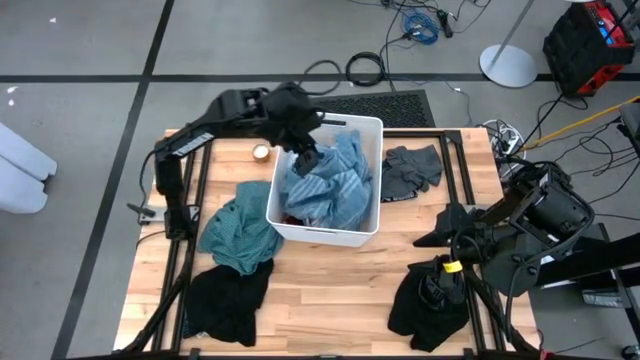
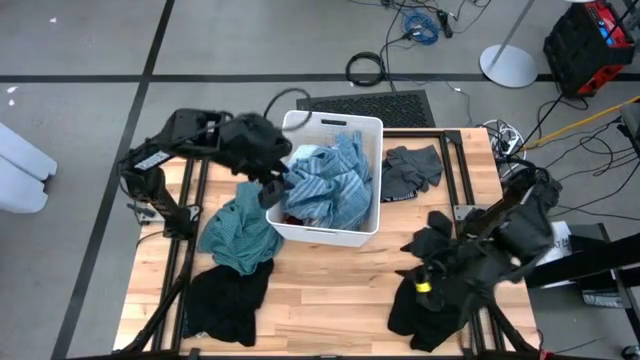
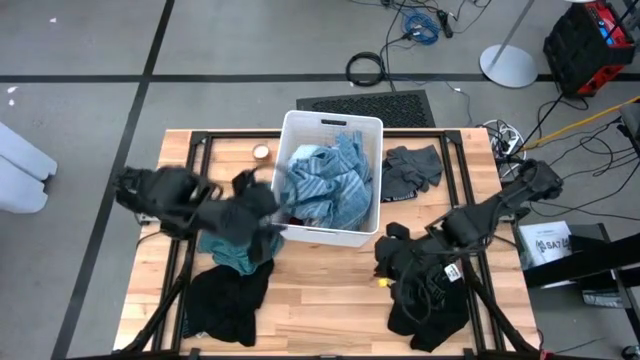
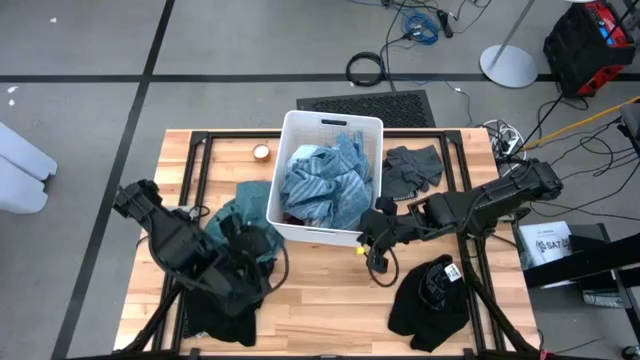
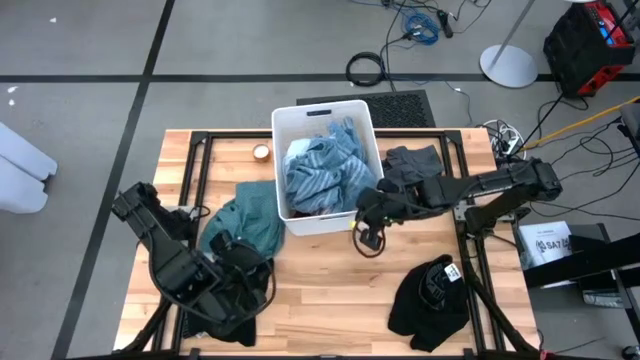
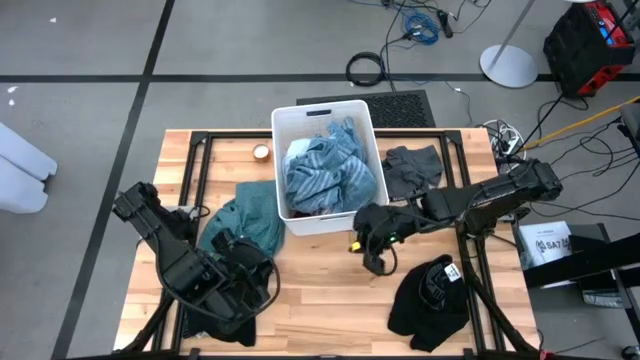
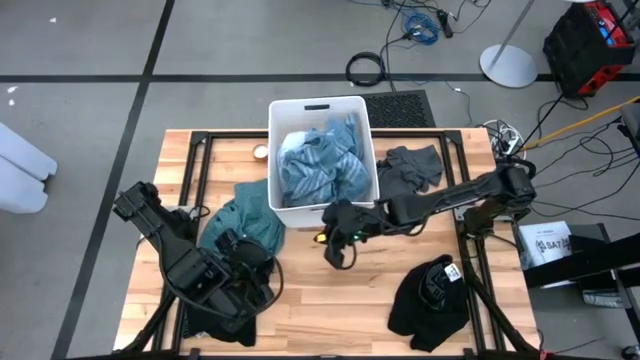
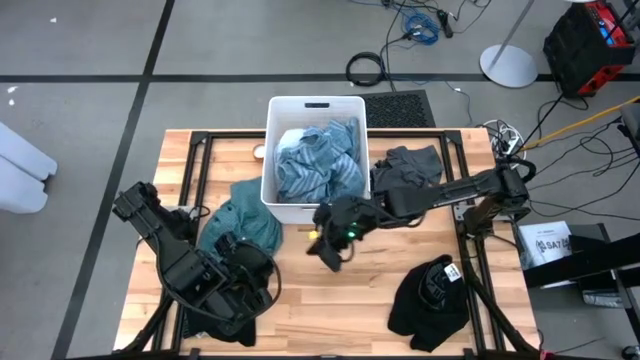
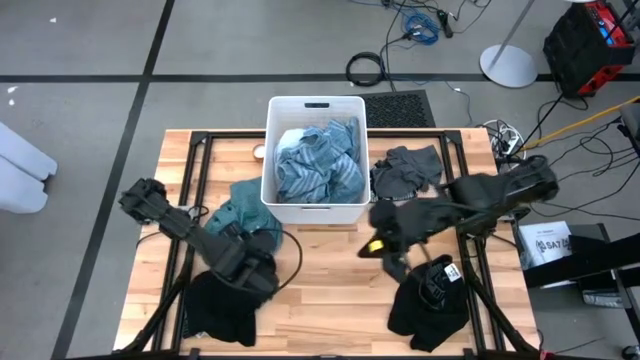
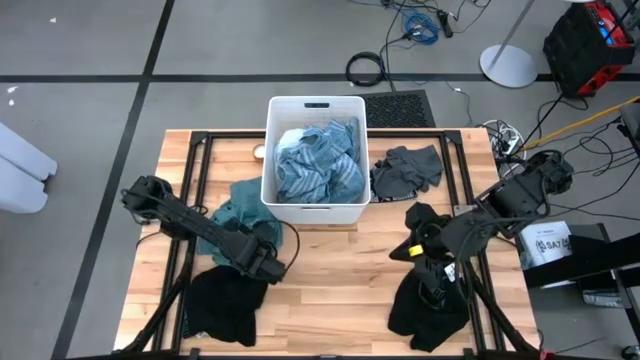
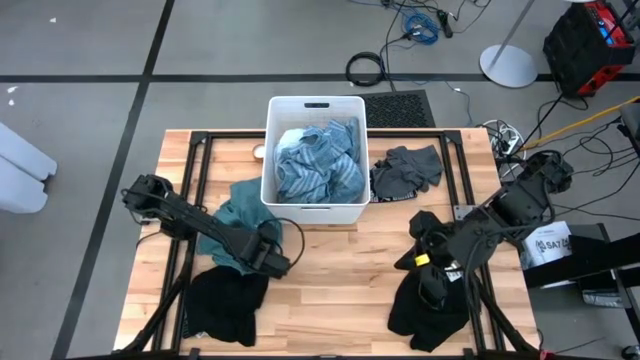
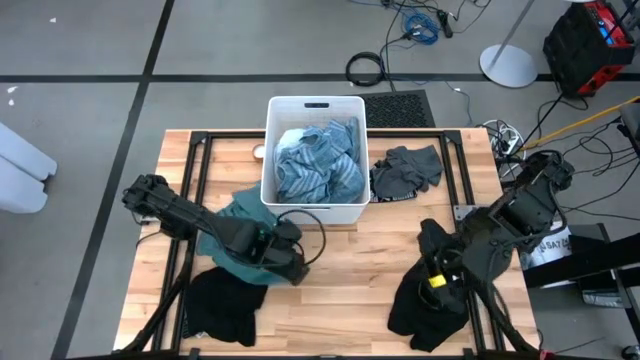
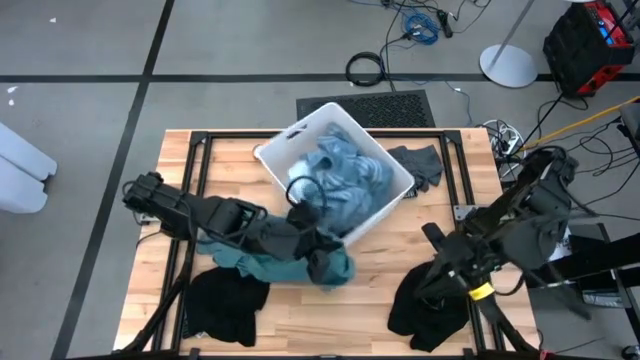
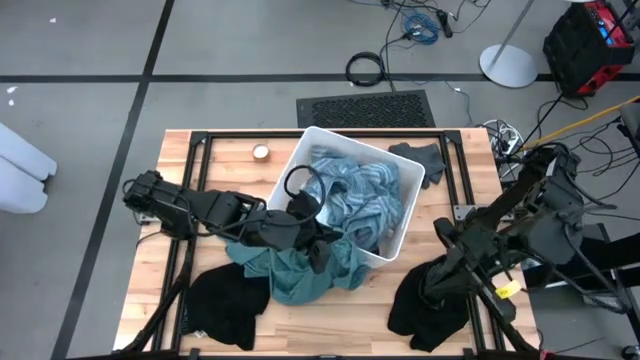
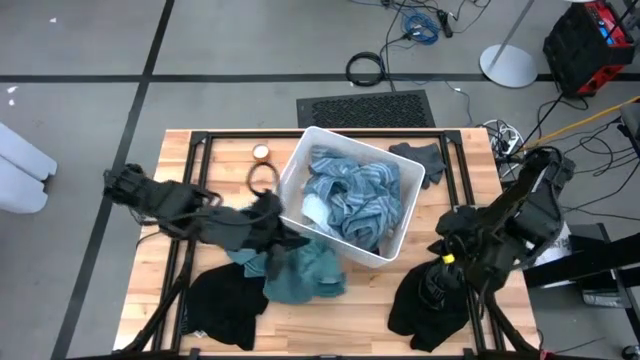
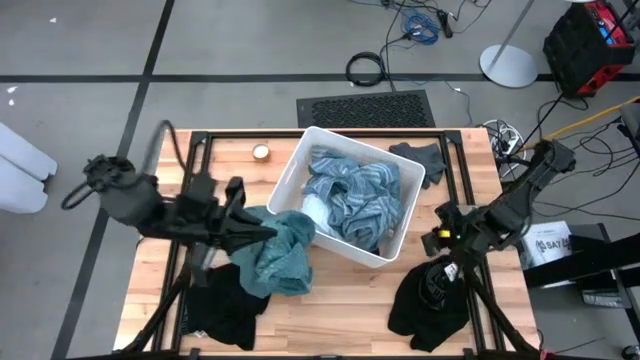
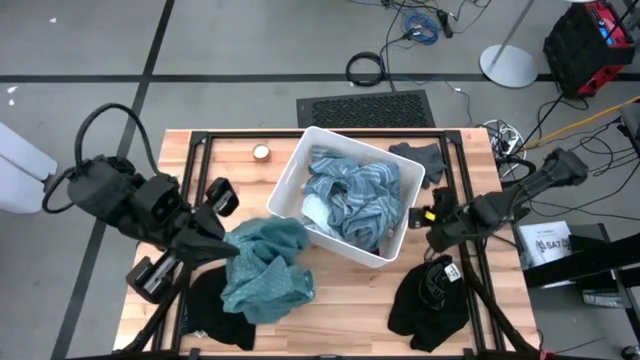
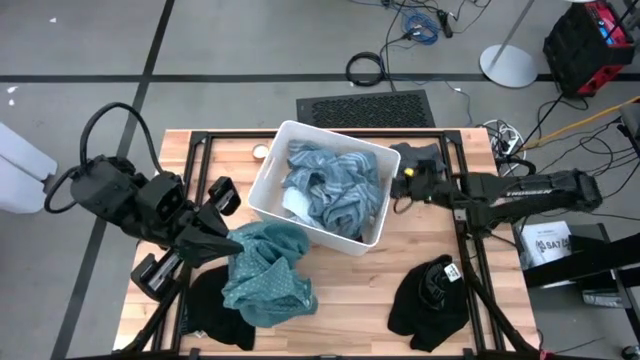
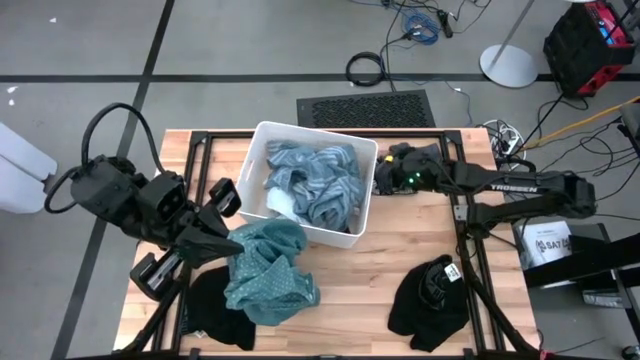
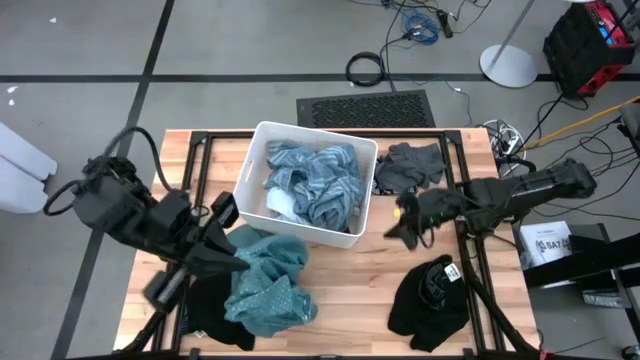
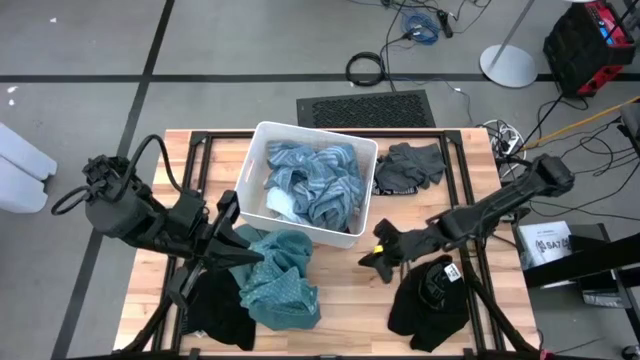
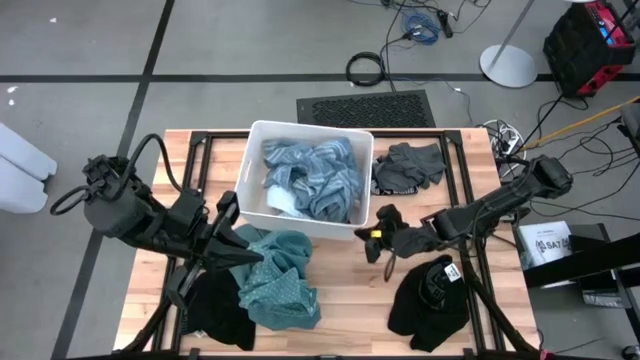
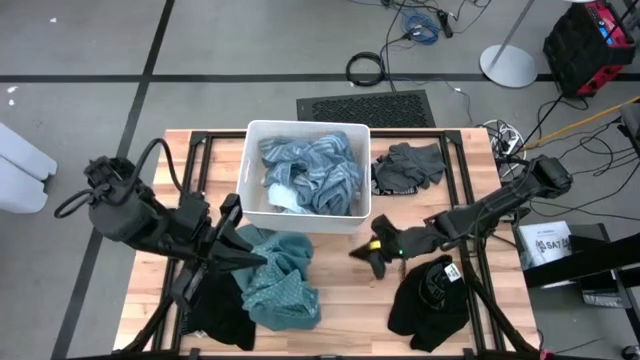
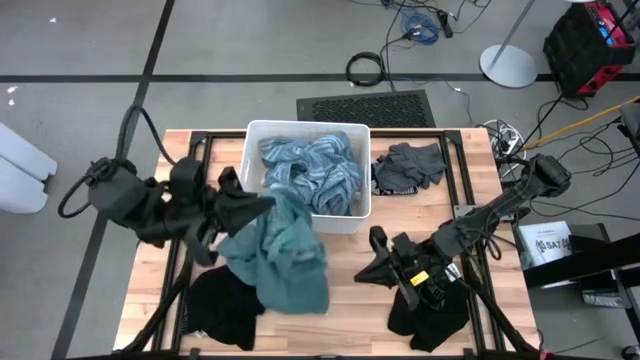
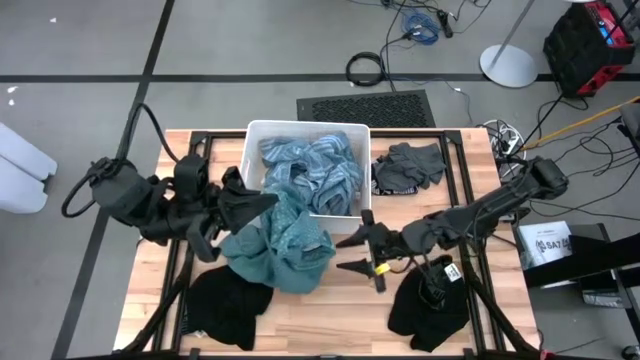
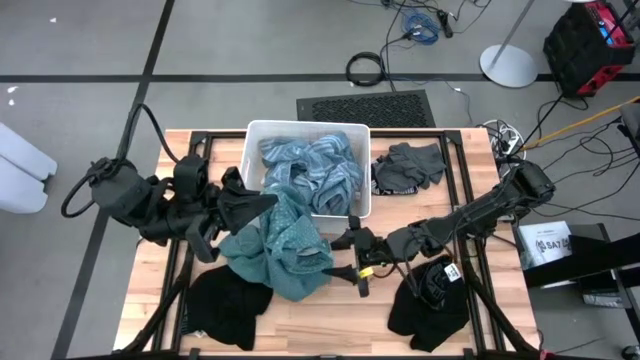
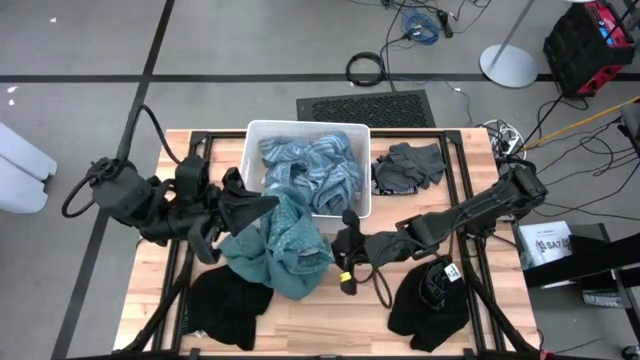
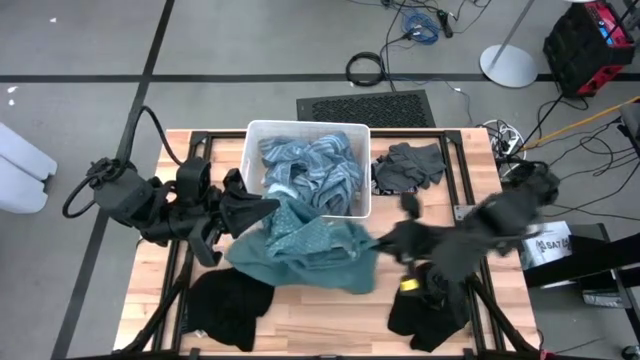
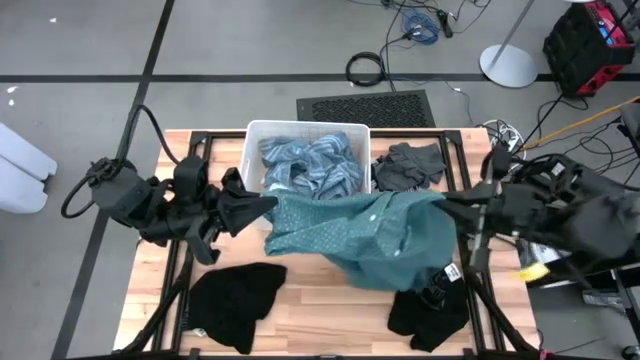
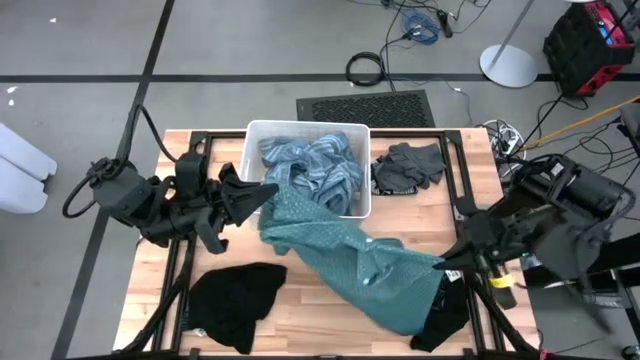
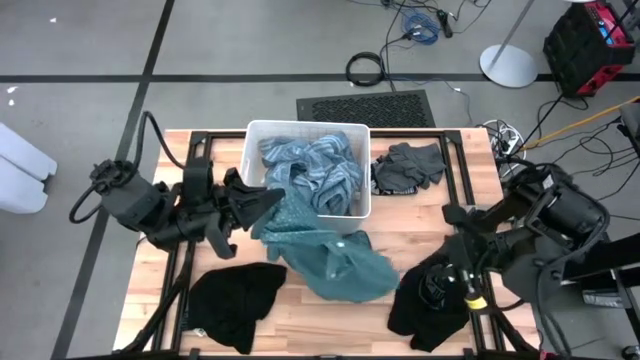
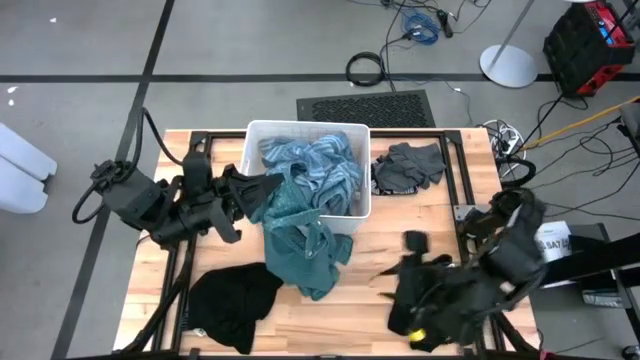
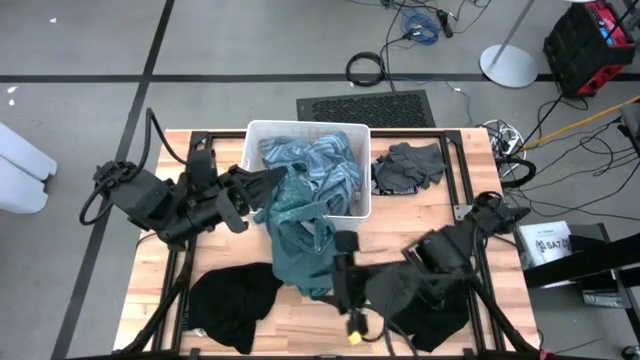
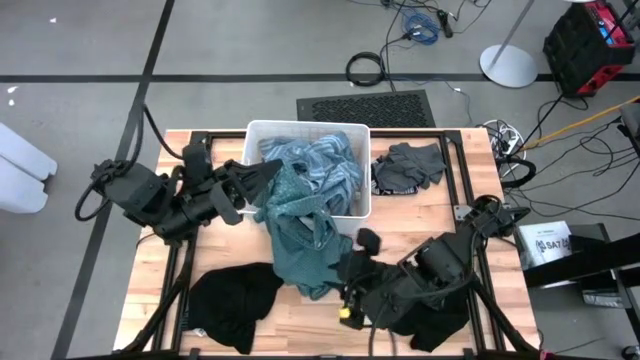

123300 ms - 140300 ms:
Task: Sort clothes
Put the green polo shirt into the white laundry bin

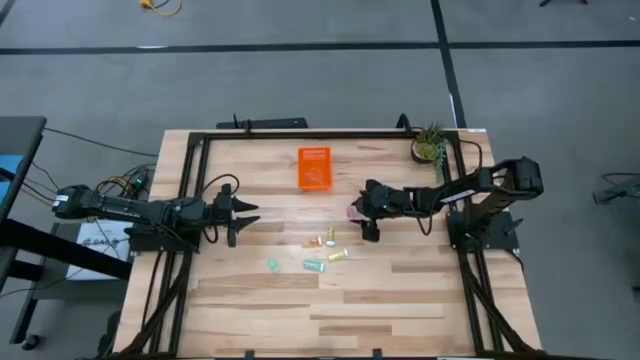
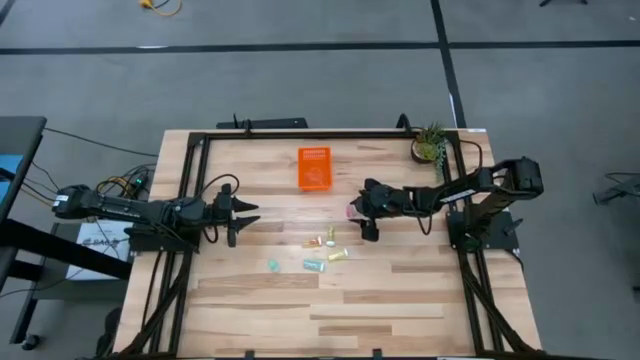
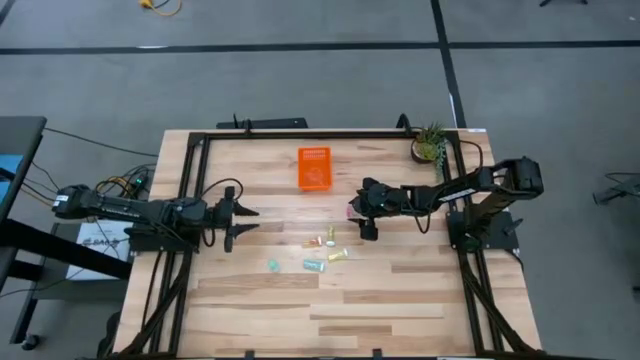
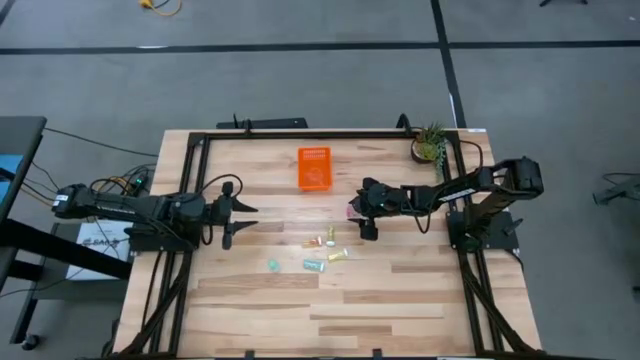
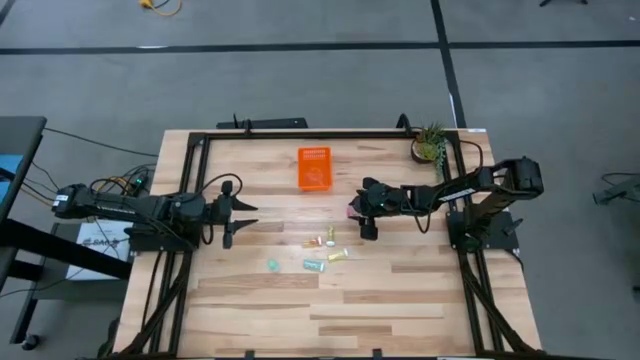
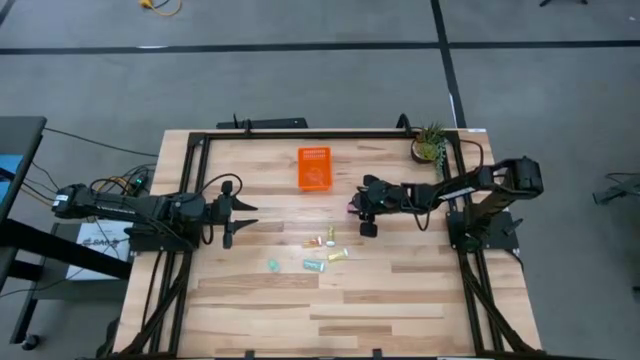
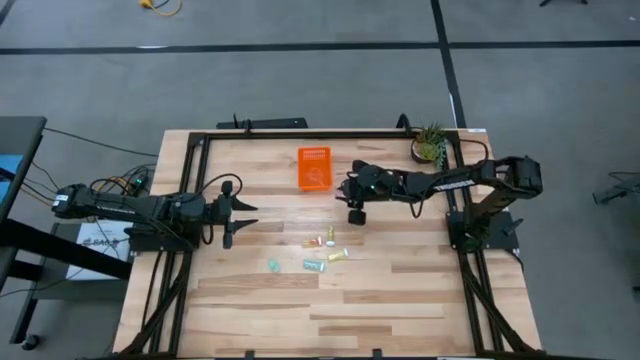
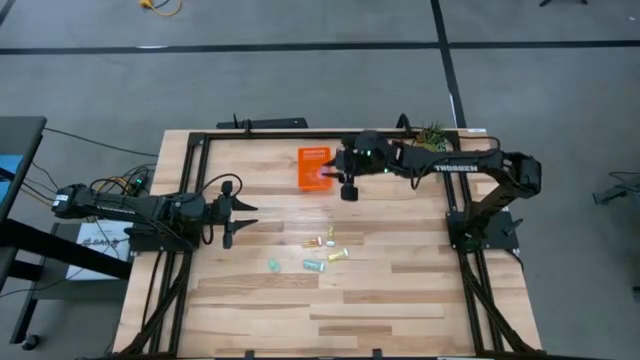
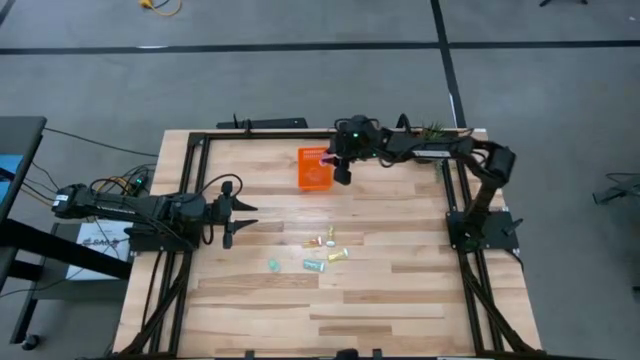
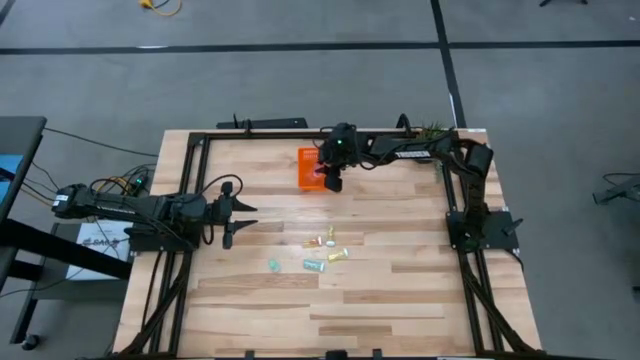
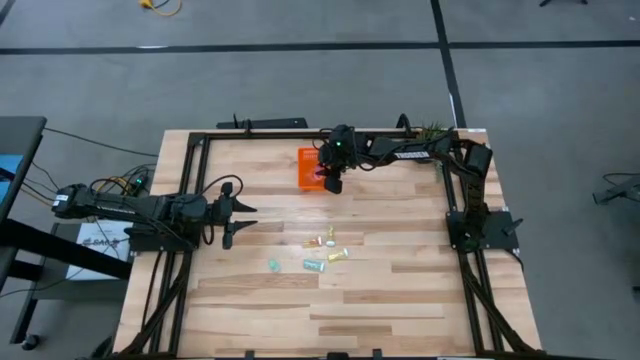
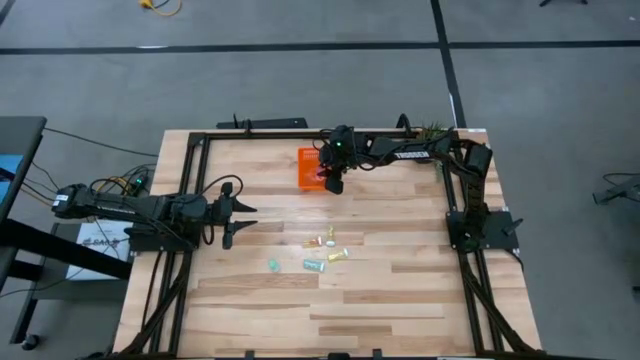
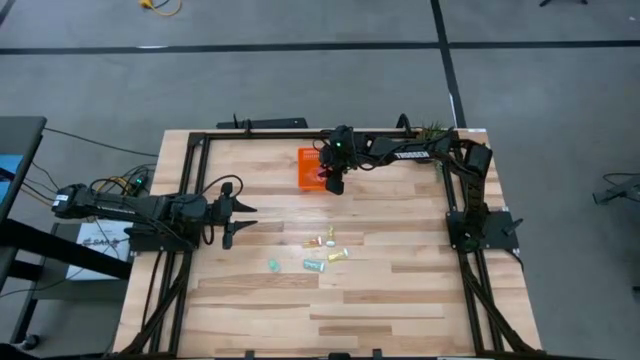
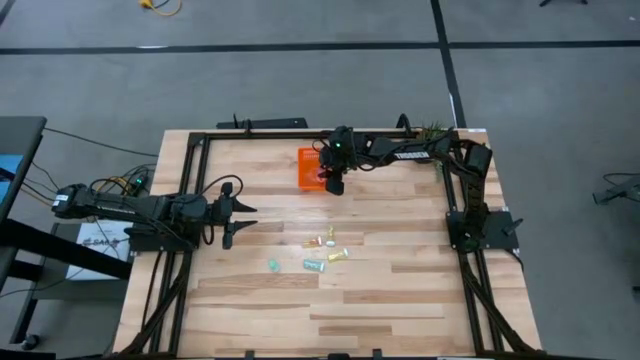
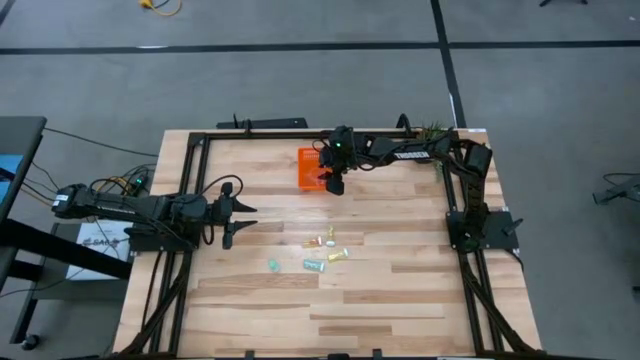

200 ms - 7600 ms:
Task: Pick and place pill bottles into a basket
Put the pink pill bottle into the orange bin
